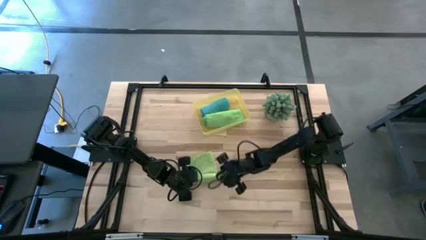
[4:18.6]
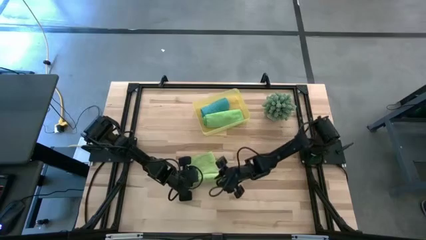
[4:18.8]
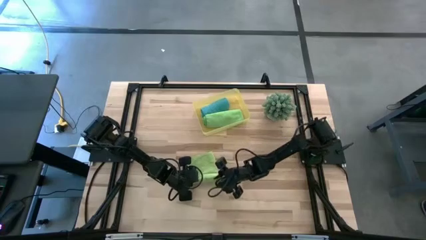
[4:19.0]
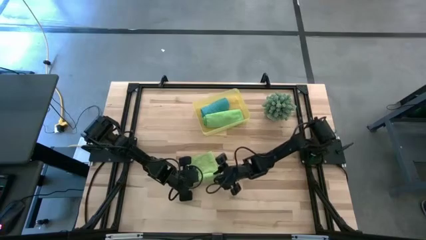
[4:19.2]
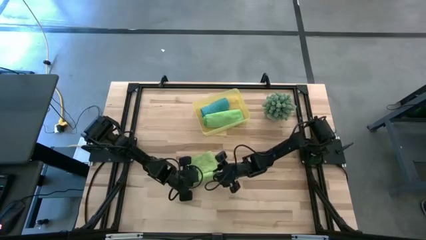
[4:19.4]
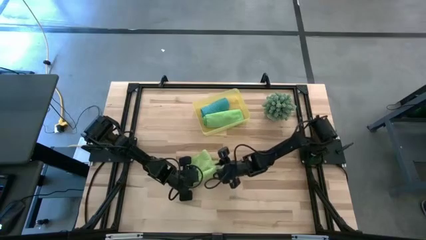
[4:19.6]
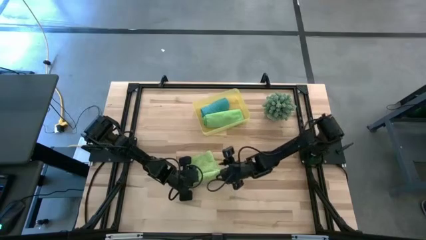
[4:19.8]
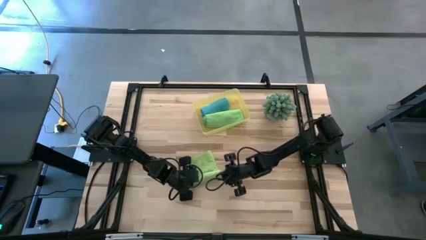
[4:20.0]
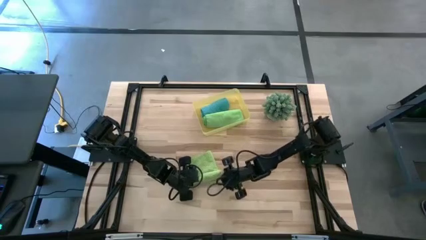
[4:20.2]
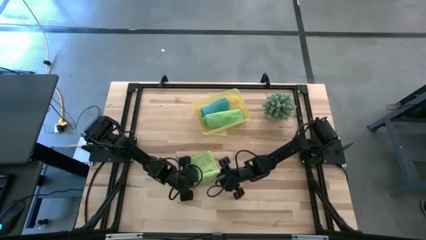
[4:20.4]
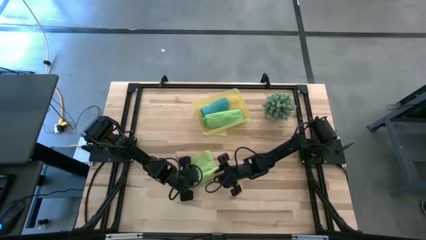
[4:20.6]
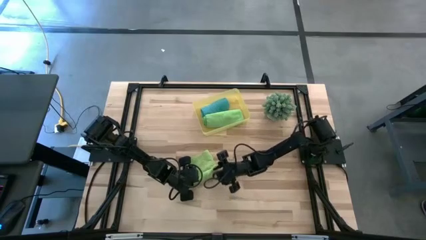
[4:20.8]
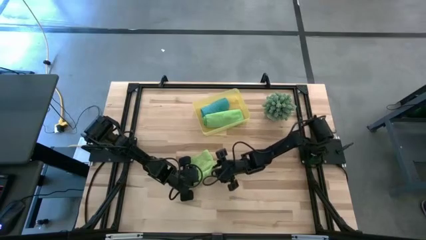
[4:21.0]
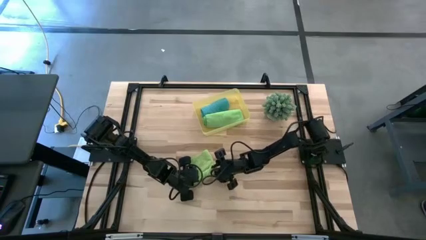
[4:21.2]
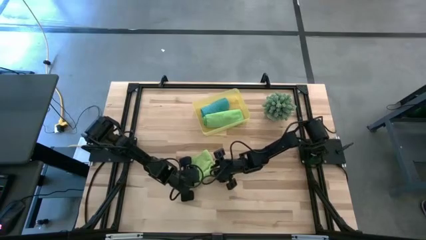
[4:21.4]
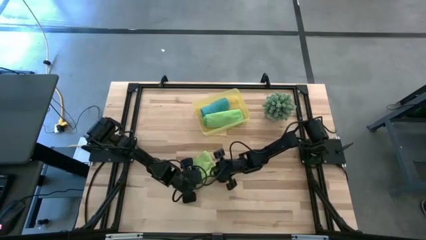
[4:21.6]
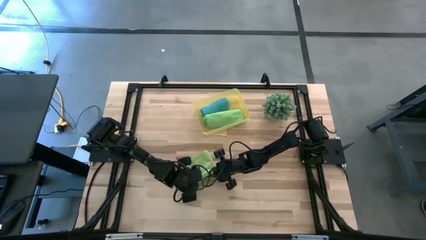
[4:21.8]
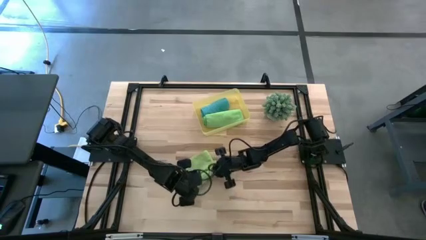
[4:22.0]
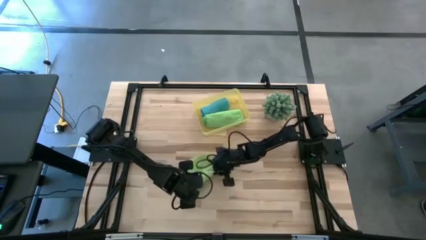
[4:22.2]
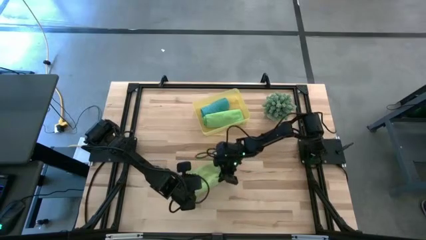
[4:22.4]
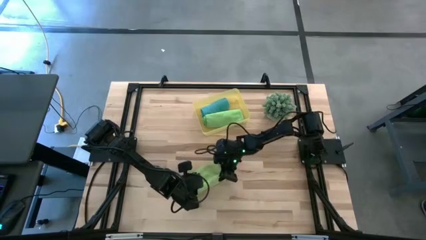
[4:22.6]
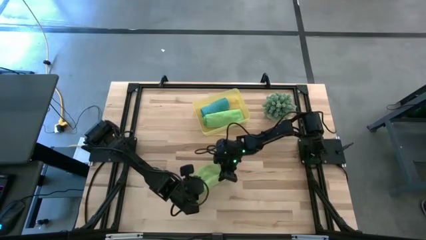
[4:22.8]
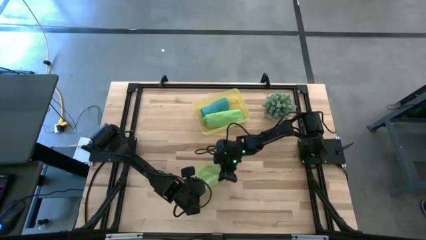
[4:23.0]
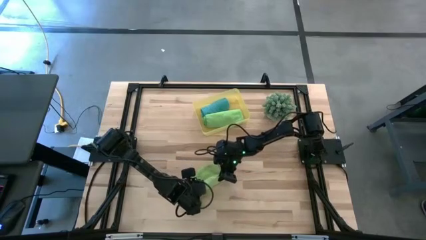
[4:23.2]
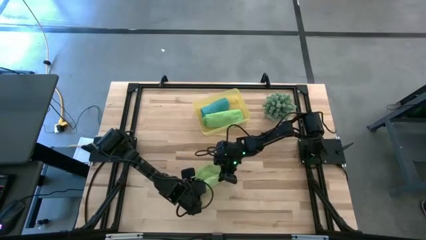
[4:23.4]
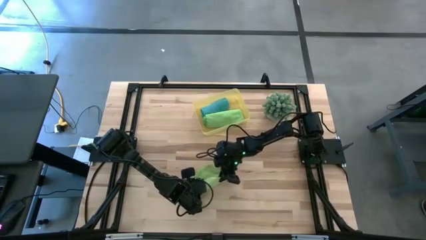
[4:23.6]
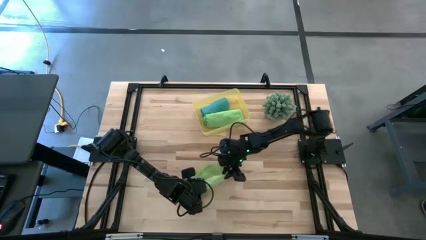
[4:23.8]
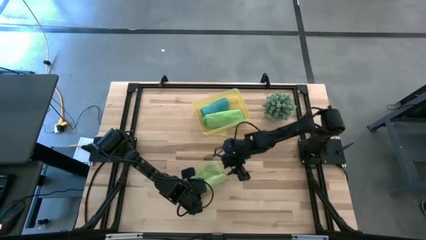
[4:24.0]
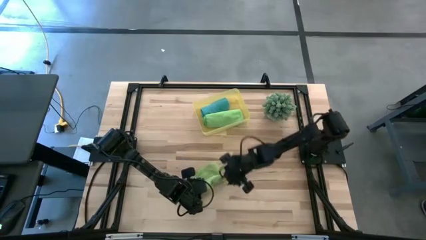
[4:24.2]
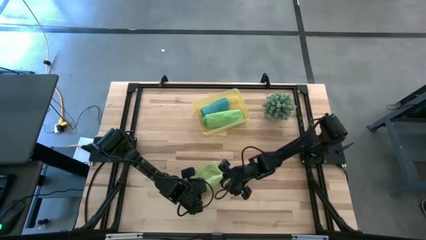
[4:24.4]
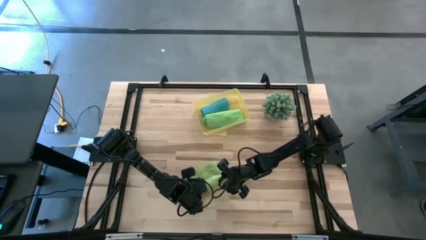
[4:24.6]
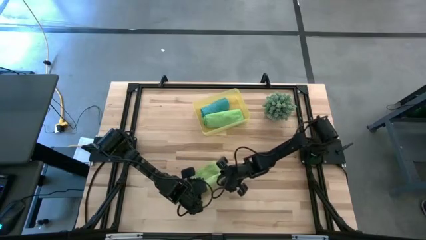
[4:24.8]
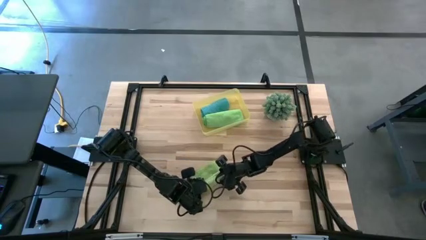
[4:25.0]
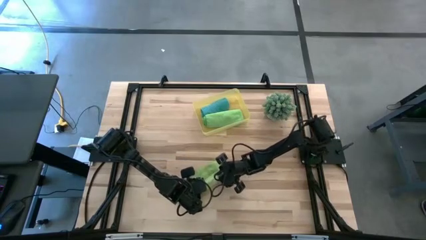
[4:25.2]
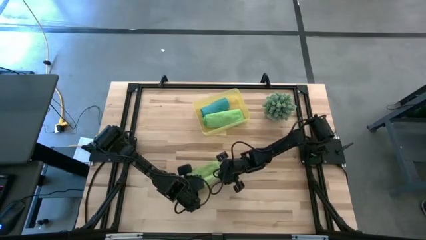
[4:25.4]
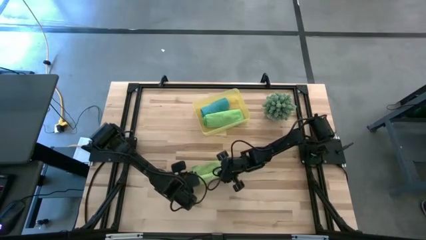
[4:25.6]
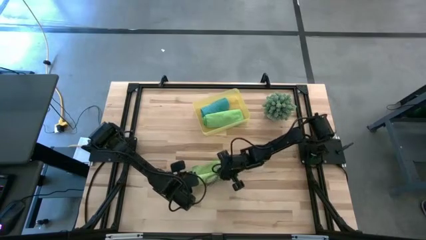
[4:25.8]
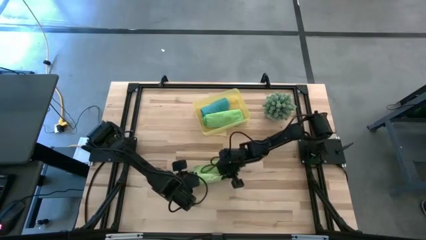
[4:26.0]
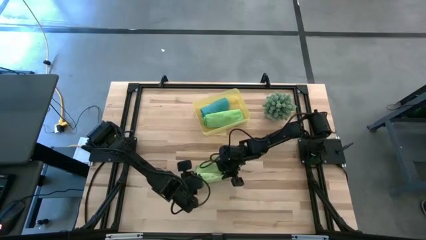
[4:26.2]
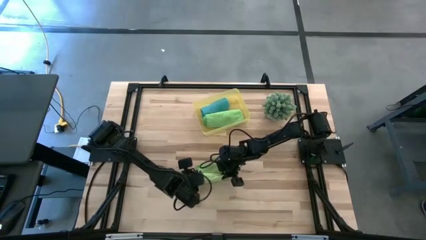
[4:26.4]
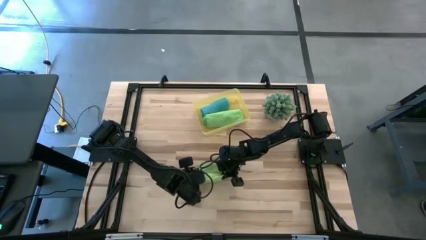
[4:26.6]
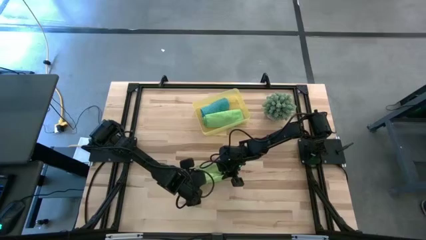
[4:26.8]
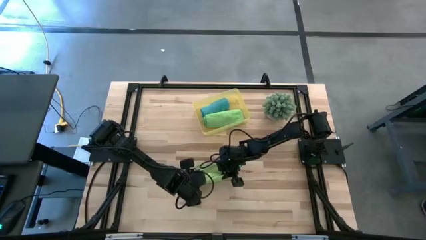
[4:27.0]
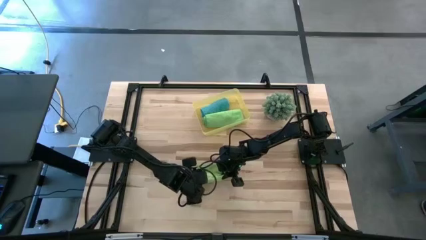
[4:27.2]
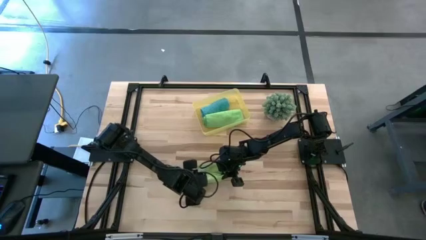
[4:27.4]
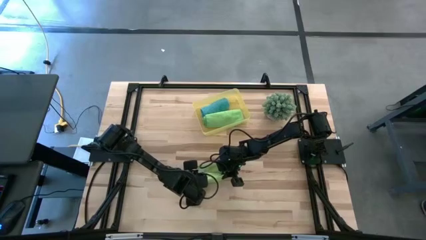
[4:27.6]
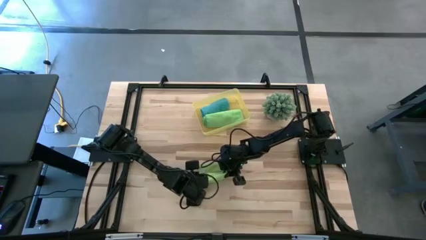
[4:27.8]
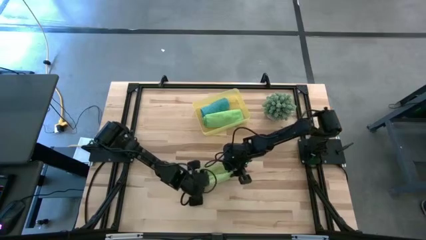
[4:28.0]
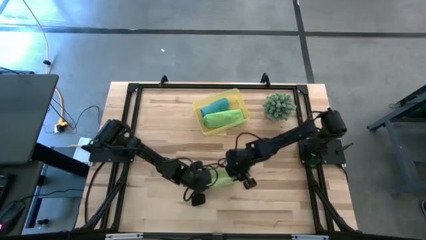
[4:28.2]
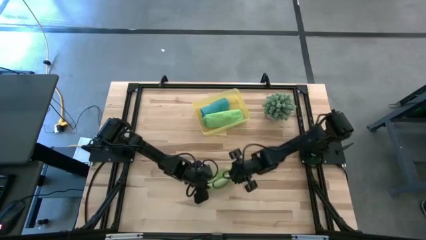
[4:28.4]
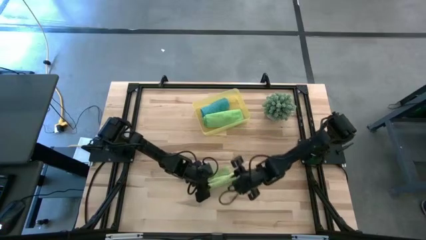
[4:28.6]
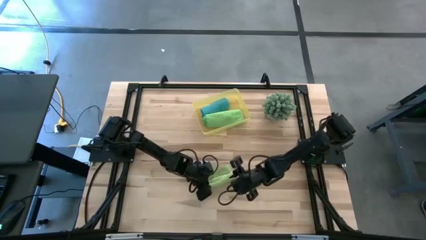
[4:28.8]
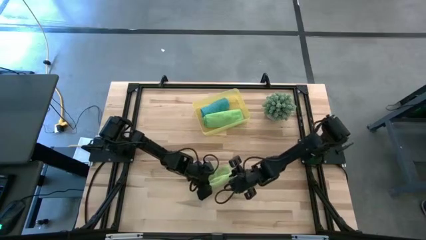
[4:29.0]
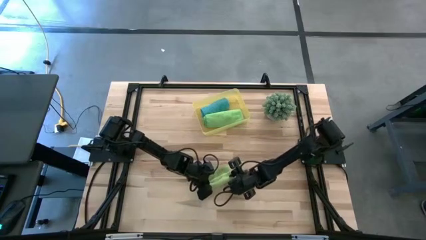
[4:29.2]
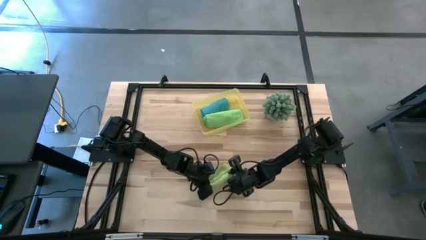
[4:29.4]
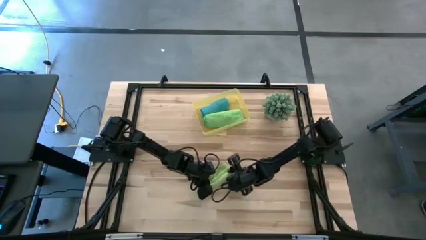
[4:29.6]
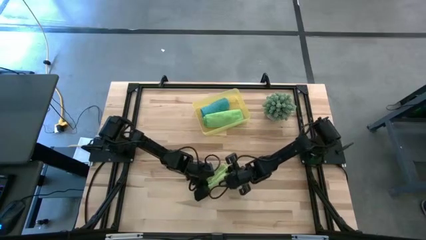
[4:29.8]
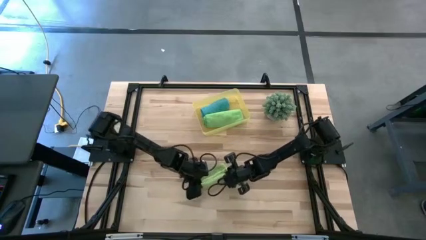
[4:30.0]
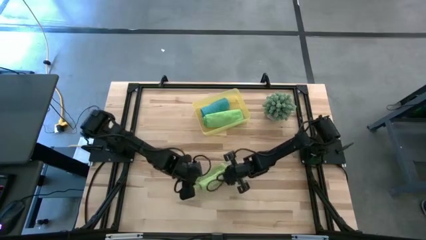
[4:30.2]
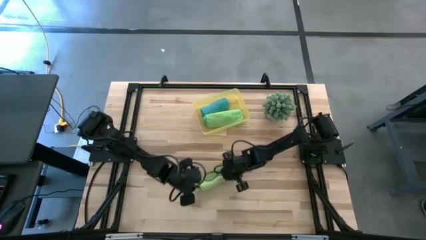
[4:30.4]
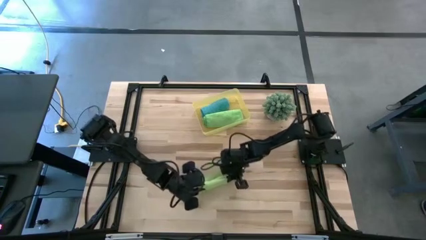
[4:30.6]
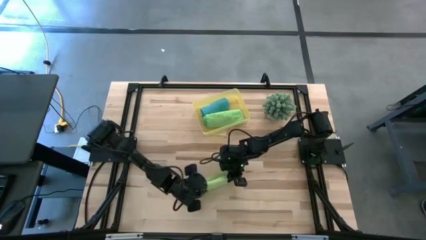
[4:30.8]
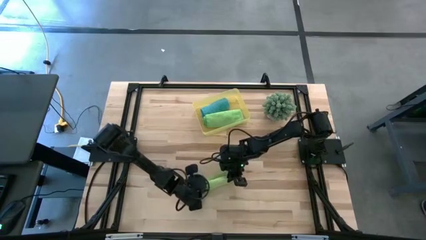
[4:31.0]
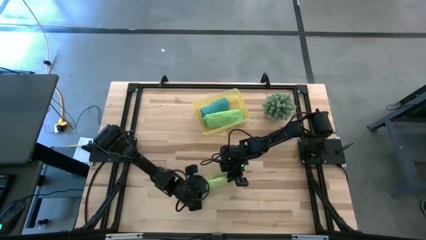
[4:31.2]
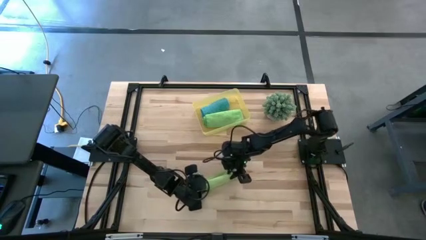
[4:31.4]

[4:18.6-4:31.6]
Task: Roll microfiber towels into tight, uniform cylinder then place into a basket
Roll the light green microfiber cloth

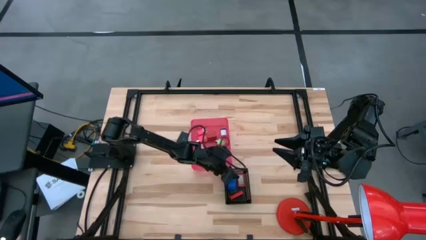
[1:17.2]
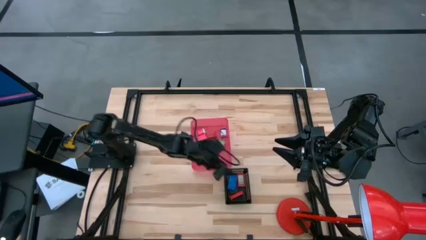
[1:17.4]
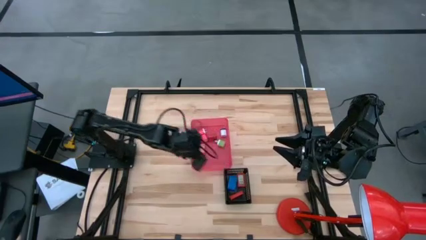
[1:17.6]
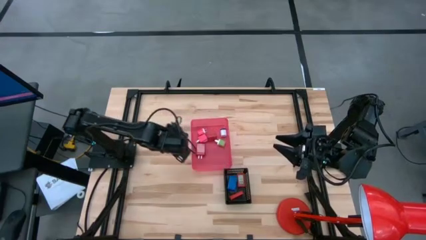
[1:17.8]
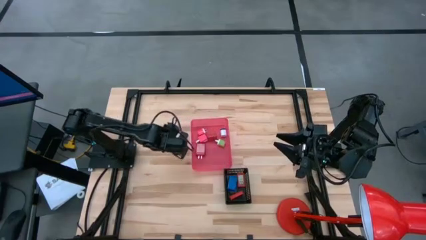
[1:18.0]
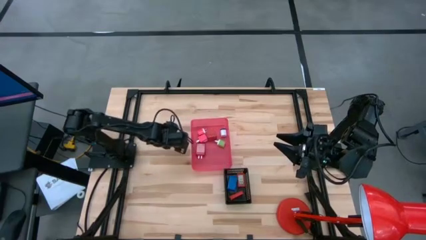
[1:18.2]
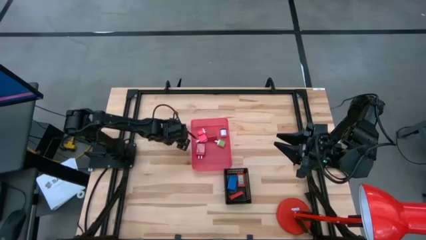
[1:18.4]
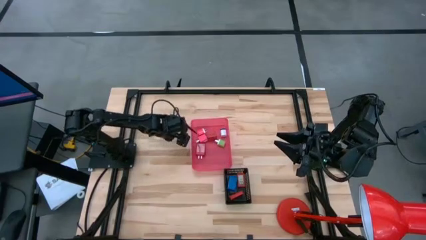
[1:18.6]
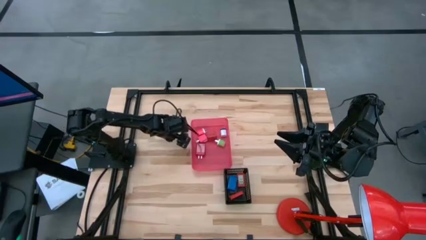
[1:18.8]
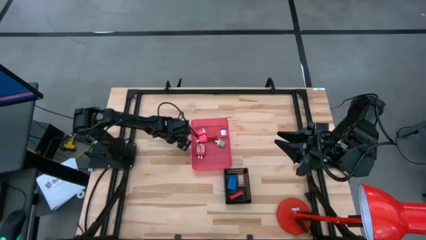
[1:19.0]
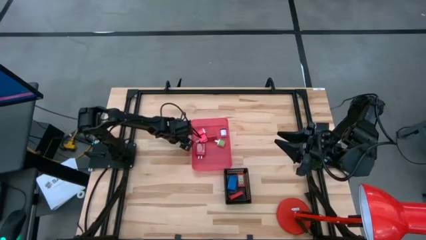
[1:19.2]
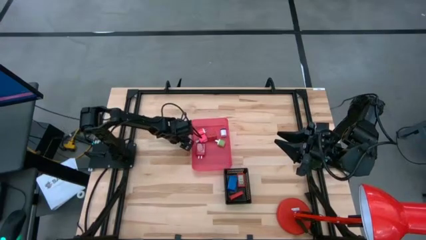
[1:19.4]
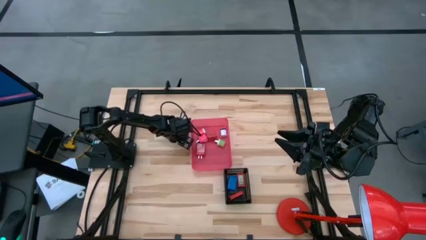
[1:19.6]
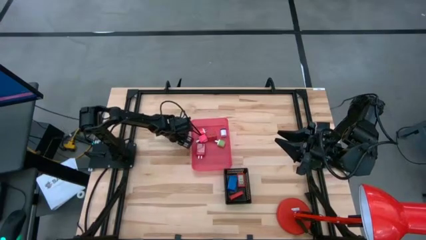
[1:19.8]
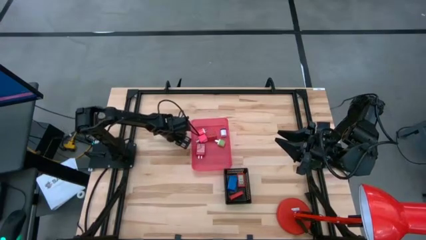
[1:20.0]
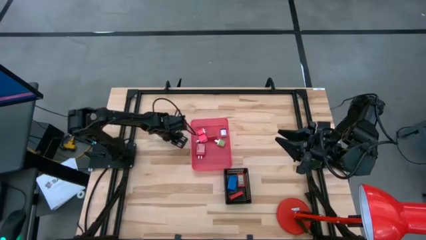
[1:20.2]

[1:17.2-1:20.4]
Task: Pick & Place Office items
Put the black digital timer into the black bin
